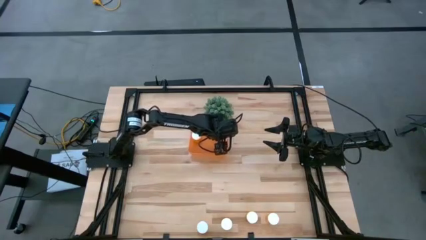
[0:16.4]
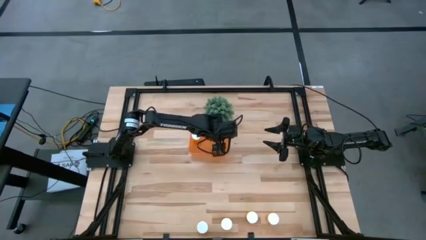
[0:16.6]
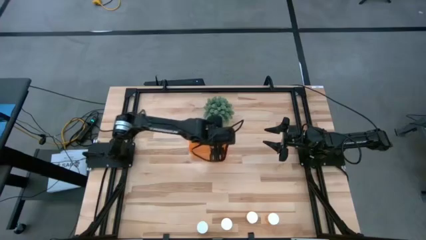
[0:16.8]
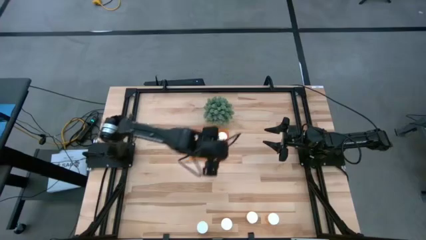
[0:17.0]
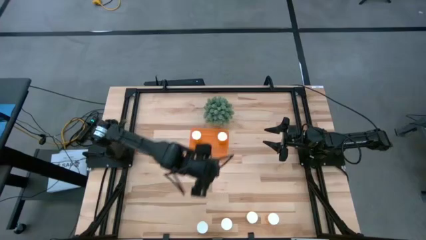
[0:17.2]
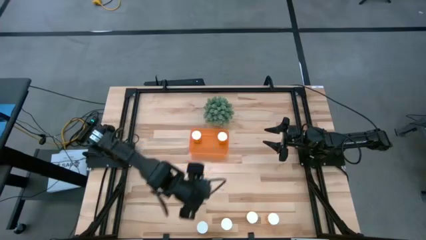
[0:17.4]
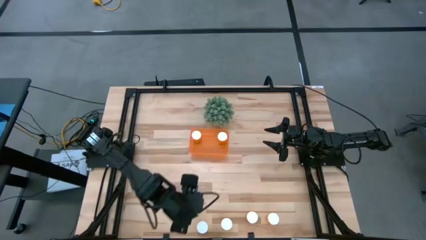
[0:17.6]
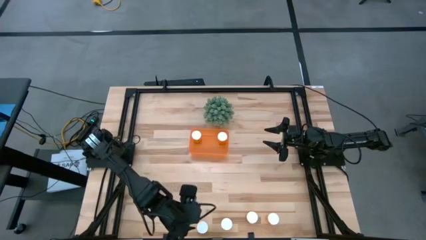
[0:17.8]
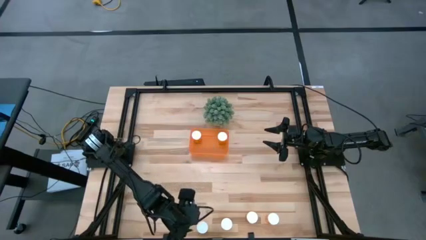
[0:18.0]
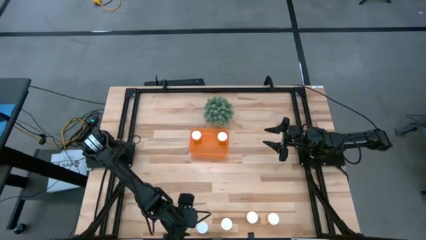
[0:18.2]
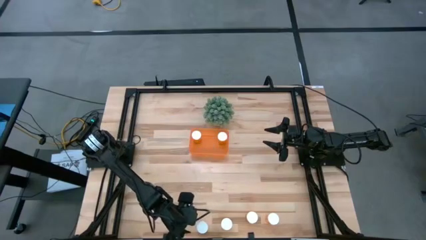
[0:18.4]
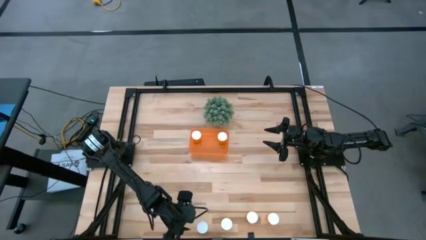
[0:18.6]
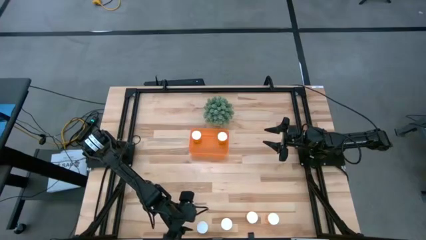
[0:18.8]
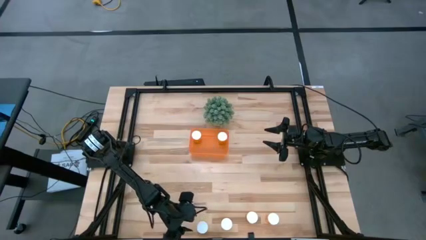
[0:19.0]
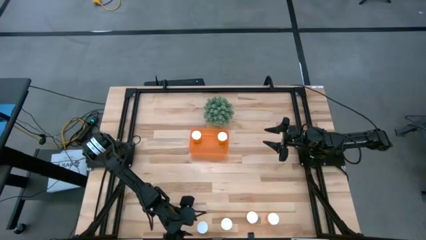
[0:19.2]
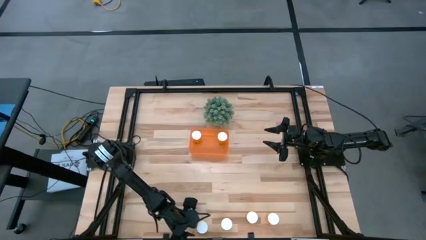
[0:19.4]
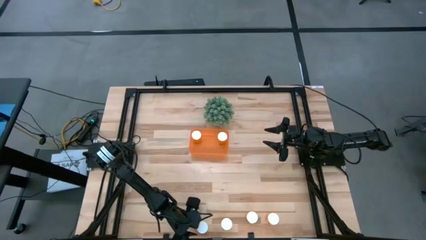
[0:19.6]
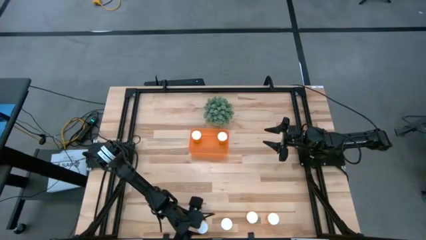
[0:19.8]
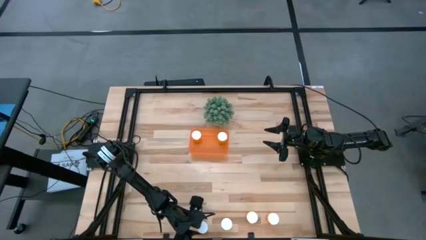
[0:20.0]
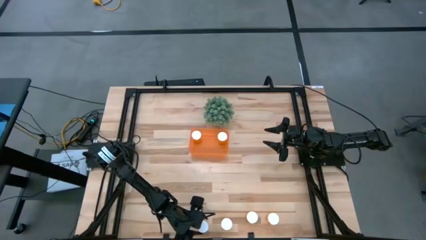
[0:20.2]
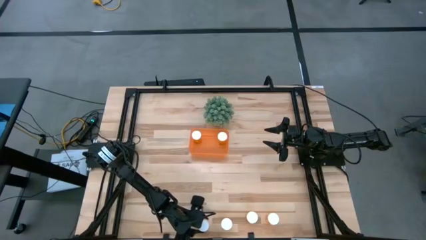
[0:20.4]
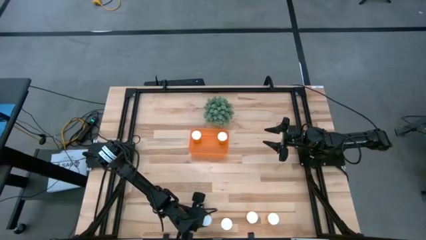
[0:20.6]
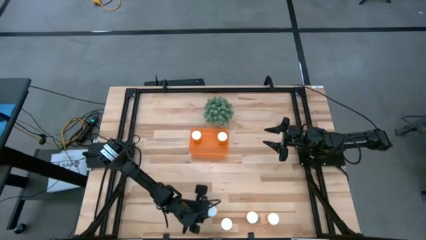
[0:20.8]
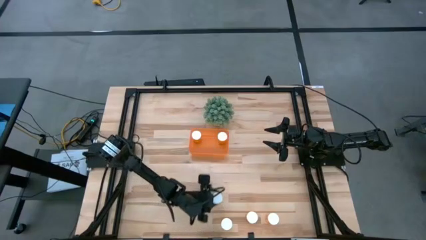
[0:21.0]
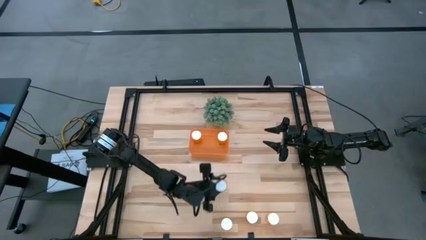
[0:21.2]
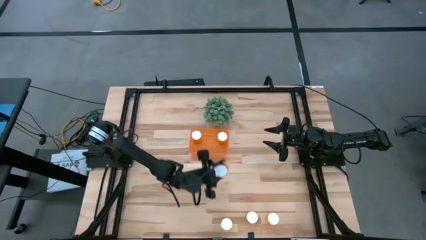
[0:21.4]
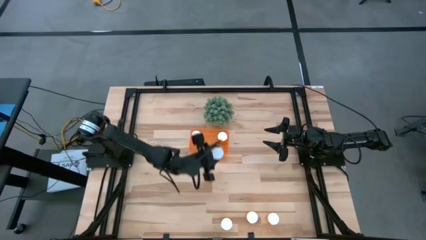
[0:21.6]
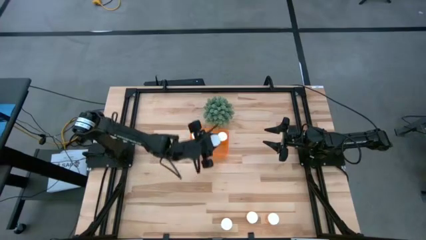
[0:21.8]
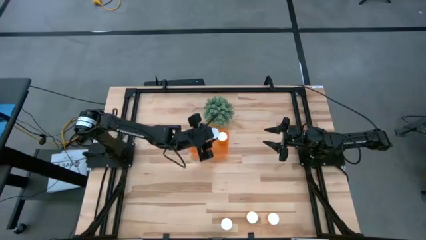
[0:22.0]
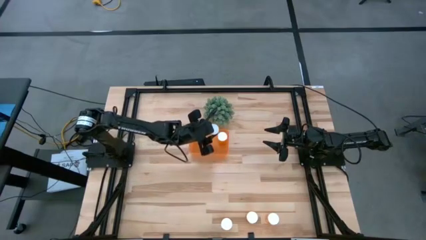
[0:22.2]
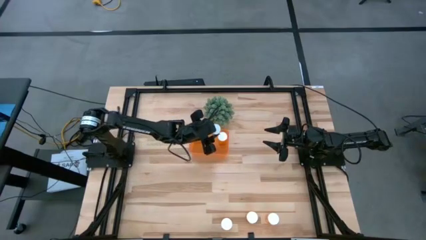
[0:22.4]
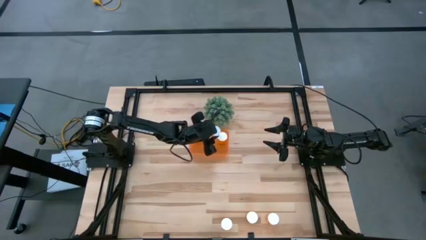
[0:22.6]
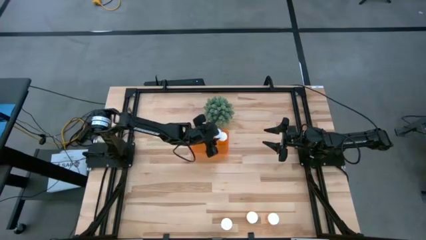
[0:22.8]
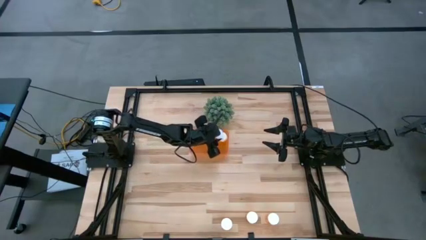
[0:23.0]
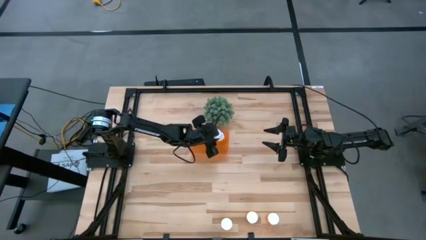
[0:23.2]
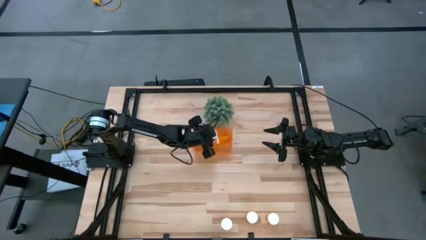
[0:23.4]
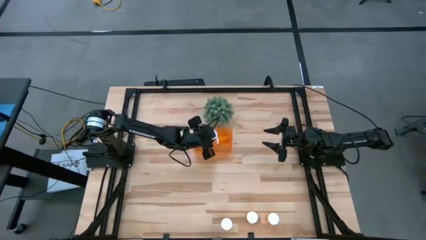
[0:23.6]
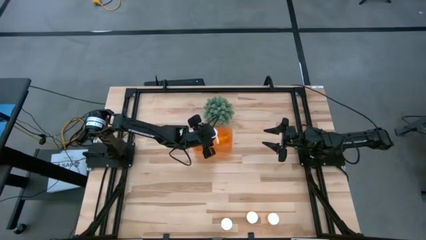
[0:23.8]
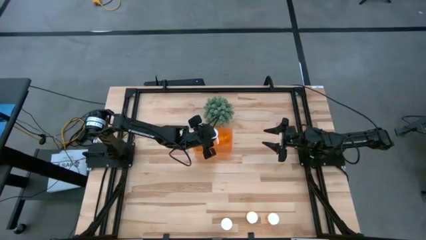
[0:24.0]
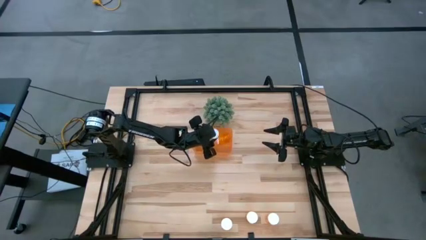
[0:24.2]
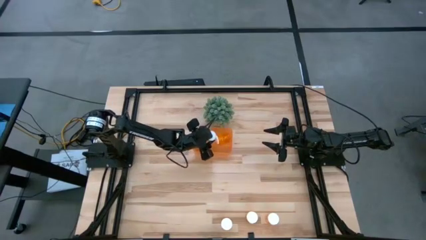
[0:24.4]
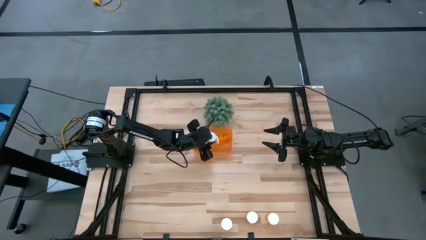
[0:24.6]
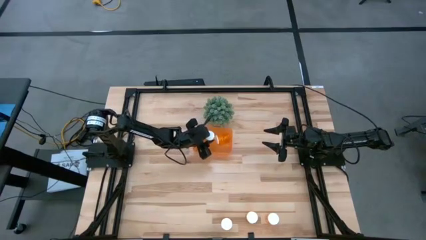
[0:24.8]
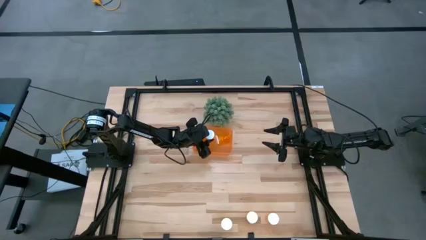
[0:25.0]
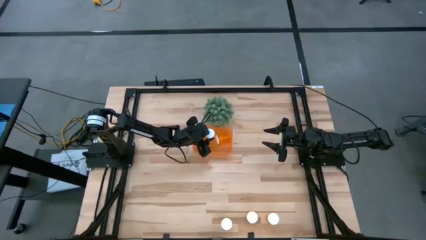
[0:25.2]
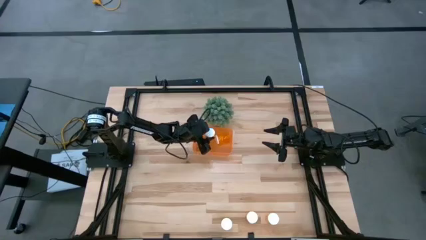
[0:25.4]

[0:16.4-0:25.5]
Task: Pick and place pill bottles into a basket
Put the orange pill bottle into the orange bin

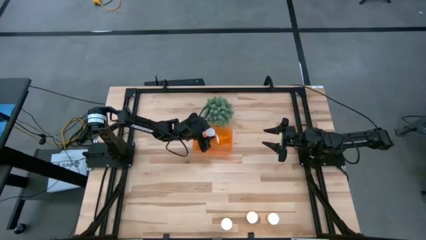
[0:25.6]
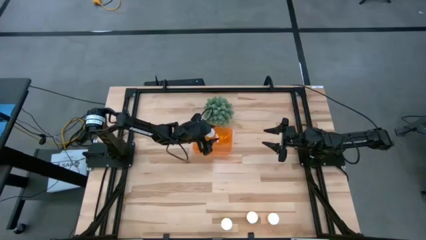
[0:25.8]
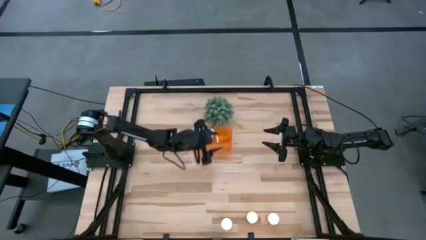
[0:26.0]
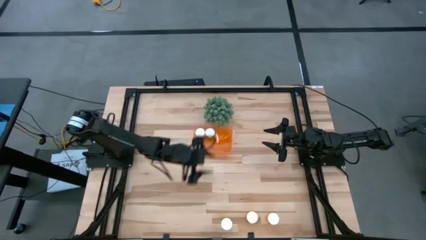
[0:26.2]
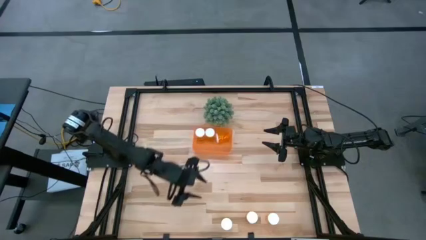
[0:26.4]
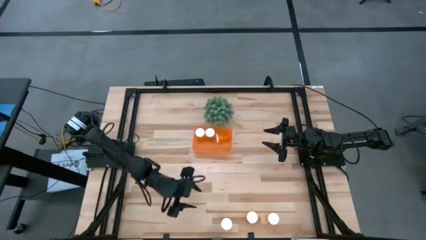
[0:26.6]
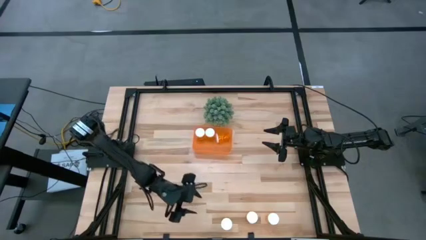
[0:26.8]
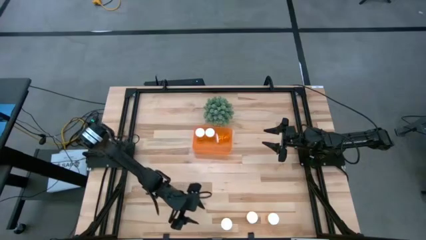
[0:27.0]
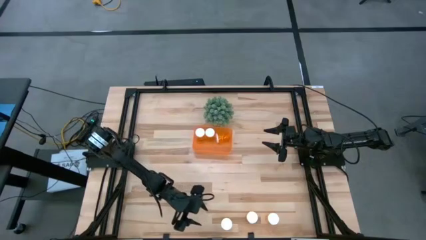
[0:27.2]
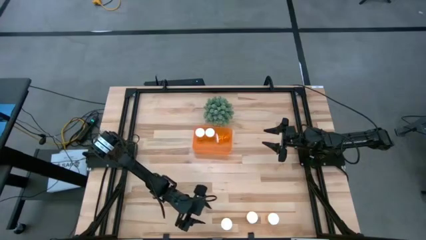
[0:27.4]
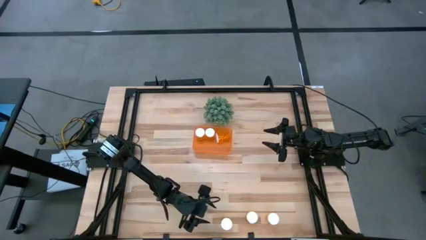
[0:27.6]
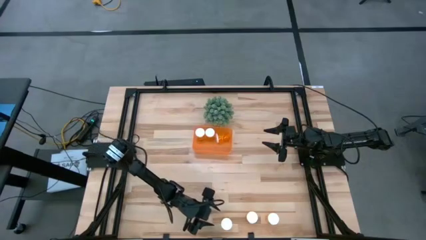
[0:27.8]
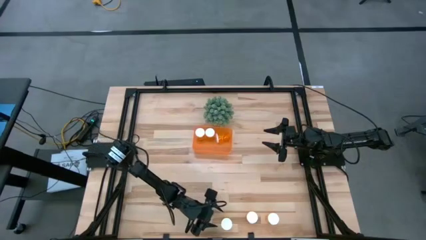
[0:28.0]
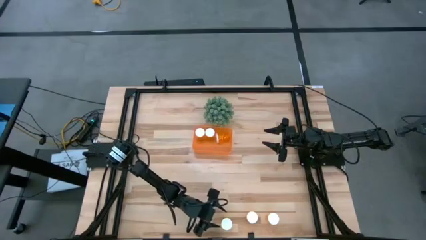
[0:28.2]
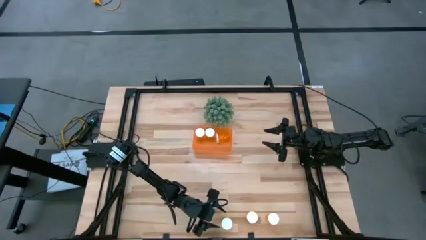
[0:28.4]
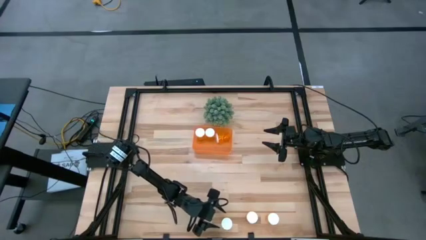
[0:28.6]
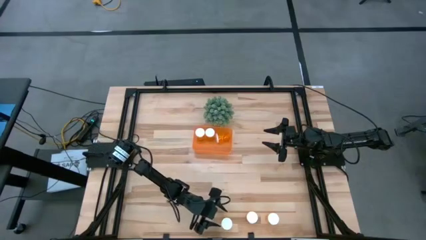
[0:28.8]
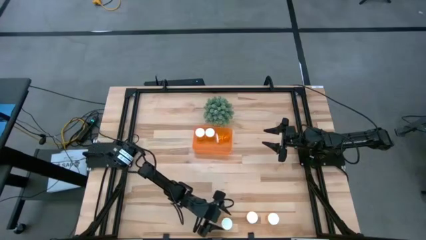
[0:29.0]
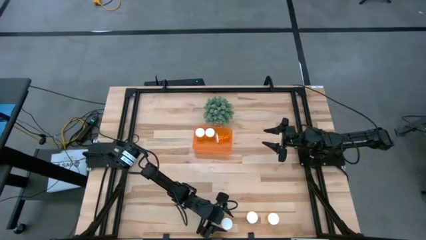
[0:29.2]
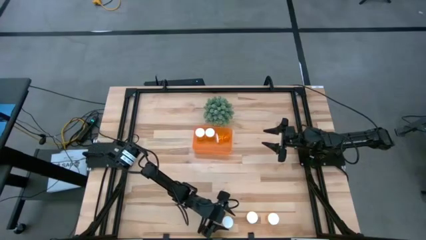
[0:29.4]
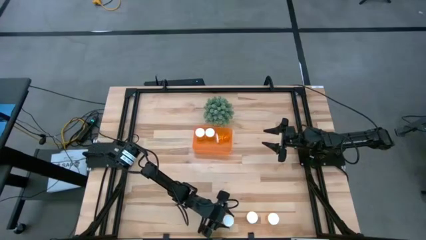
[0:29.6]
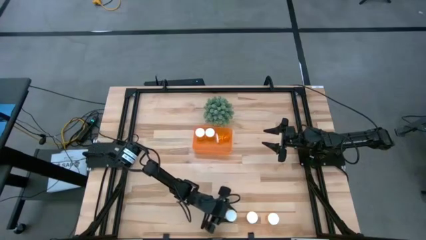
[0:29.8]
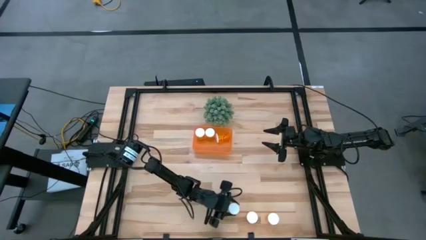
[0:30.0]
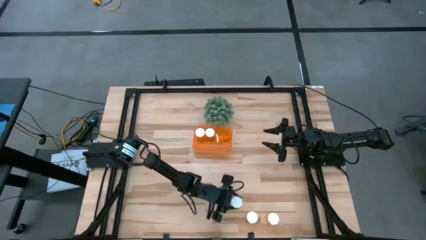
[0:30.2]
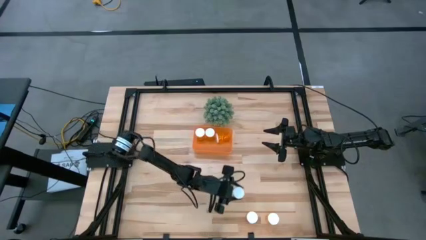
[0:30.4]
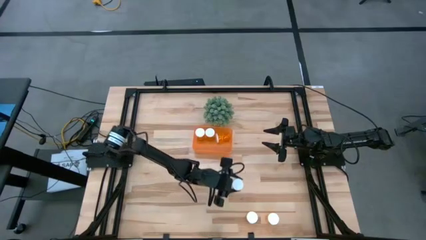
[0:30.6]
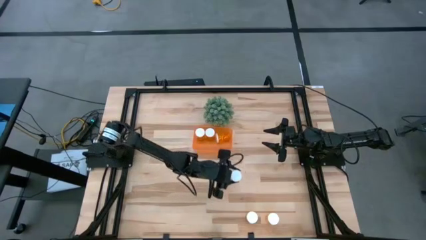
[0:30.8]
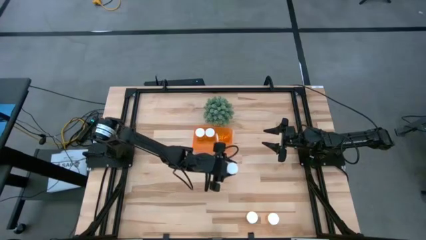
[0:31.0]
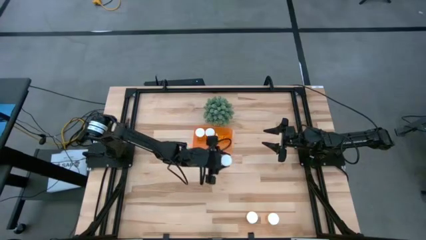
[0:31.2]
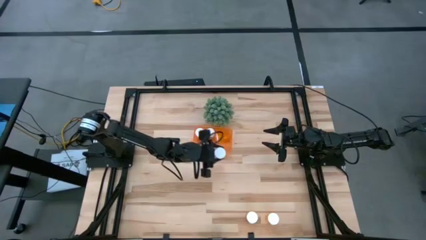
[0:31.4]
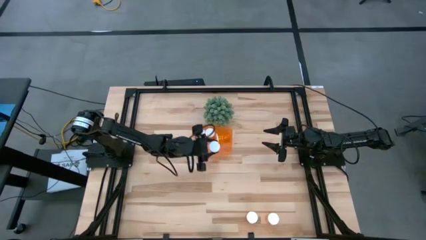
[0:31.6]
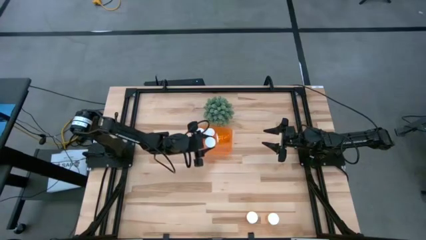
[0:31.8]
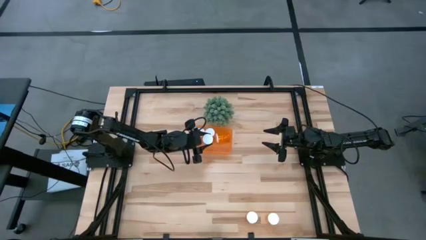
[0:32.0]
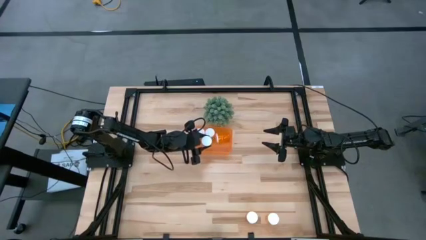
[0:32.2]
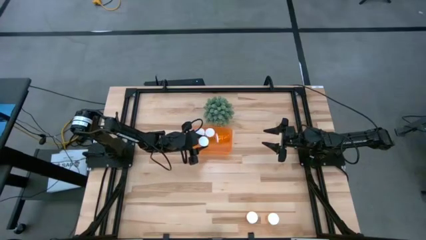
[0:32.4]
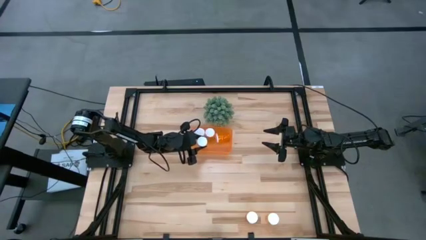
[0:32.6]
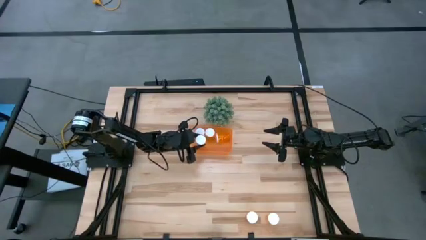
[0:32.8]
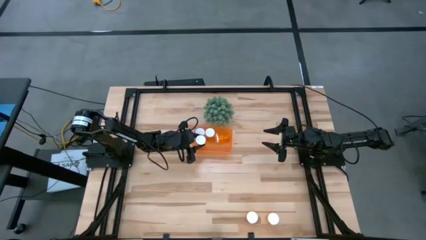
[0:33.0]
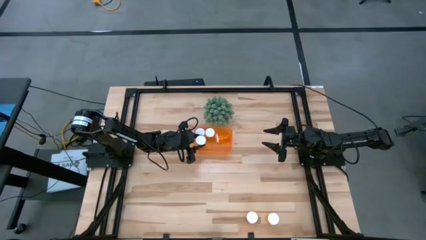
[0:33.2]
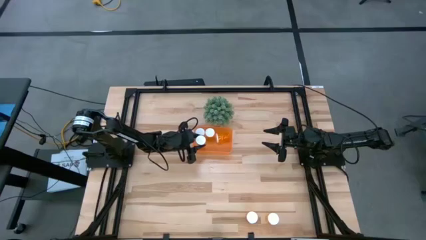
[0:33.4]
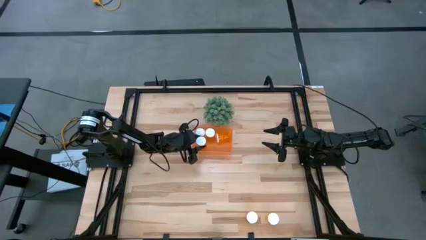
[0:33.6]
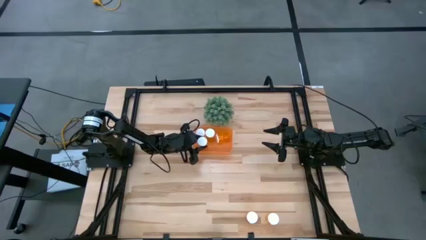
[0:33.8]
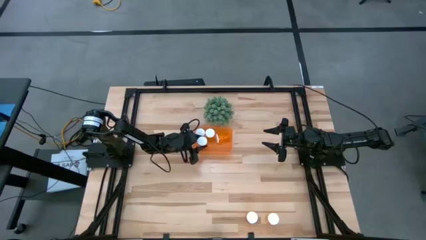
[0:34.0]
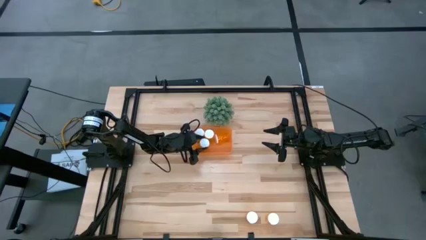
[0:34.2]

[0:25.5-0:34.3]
Put the orange pill bottle into the orange bin
